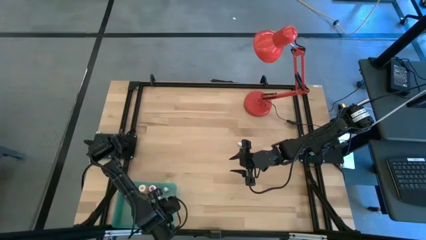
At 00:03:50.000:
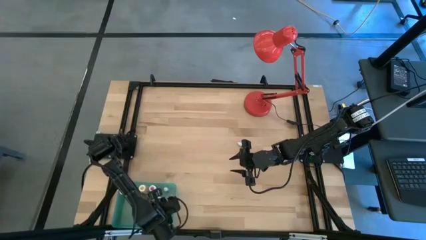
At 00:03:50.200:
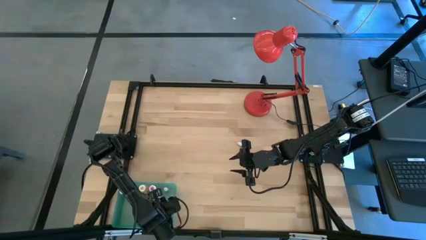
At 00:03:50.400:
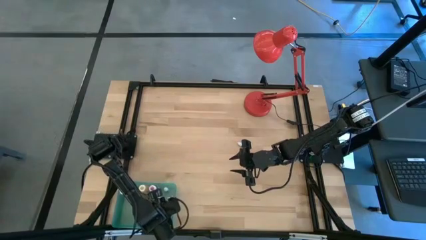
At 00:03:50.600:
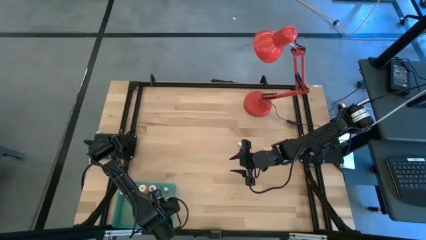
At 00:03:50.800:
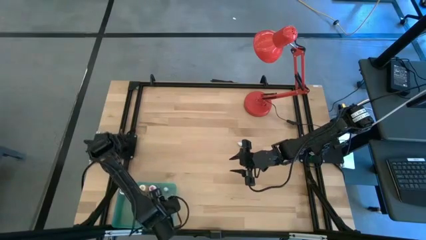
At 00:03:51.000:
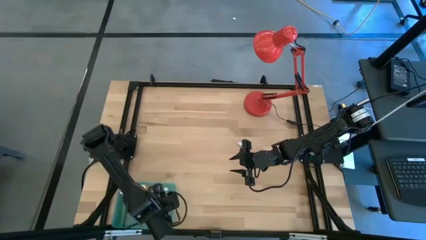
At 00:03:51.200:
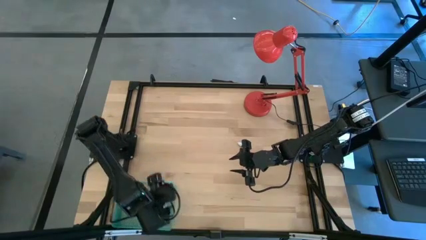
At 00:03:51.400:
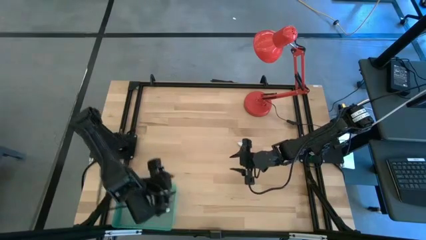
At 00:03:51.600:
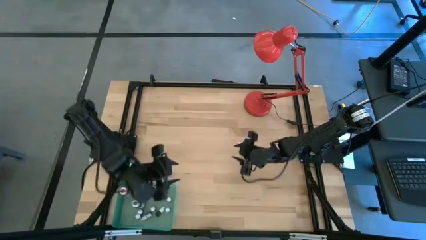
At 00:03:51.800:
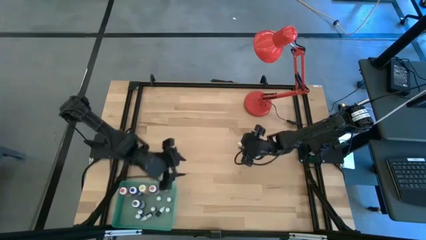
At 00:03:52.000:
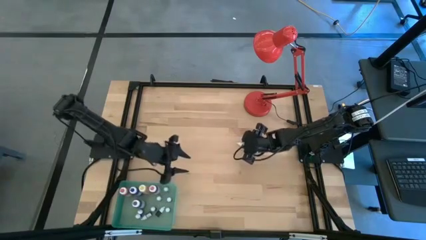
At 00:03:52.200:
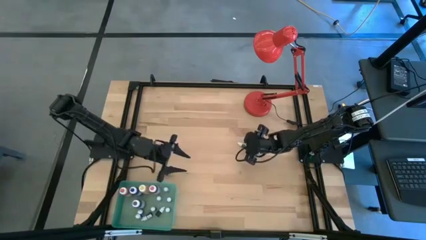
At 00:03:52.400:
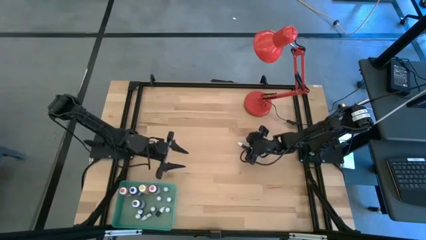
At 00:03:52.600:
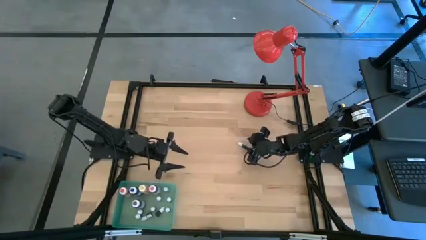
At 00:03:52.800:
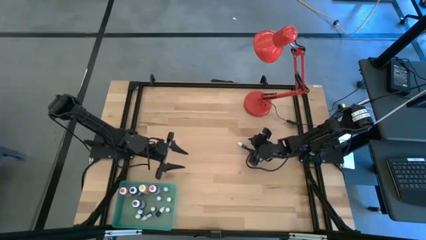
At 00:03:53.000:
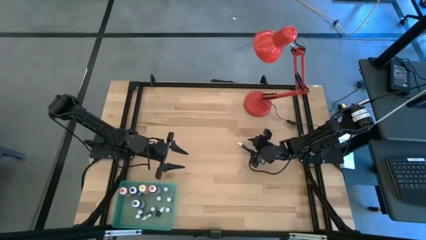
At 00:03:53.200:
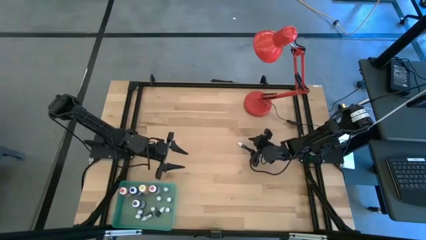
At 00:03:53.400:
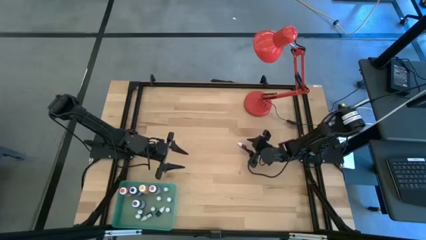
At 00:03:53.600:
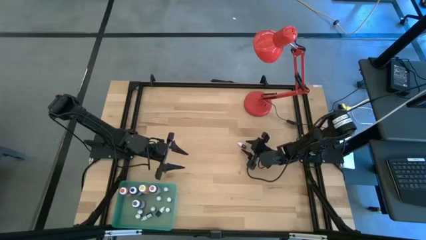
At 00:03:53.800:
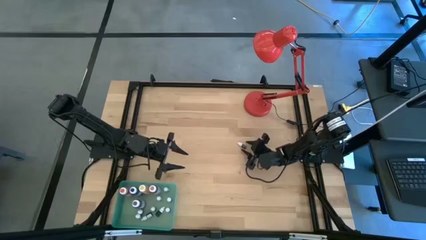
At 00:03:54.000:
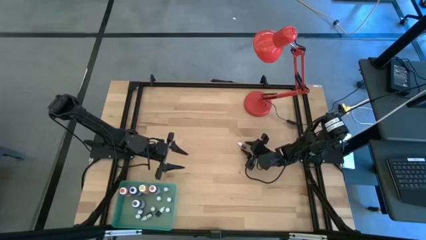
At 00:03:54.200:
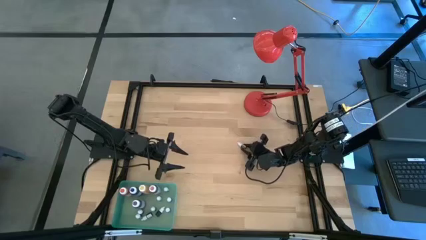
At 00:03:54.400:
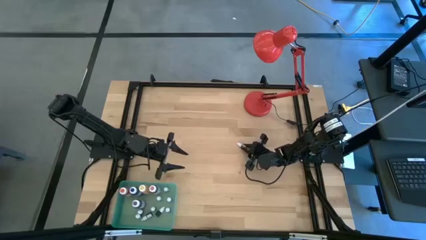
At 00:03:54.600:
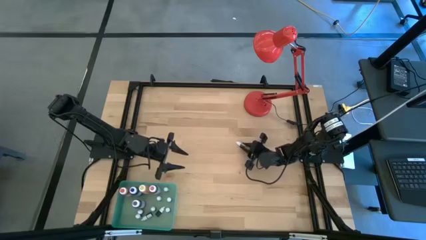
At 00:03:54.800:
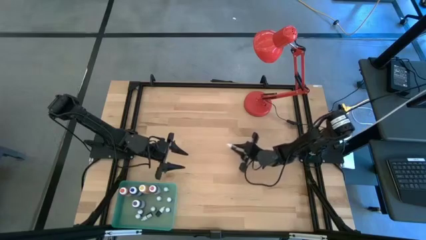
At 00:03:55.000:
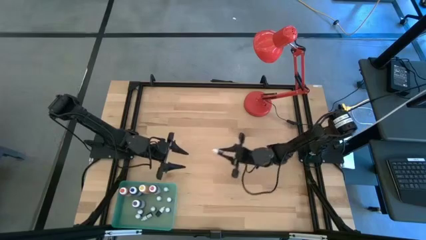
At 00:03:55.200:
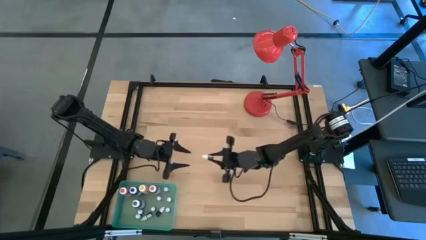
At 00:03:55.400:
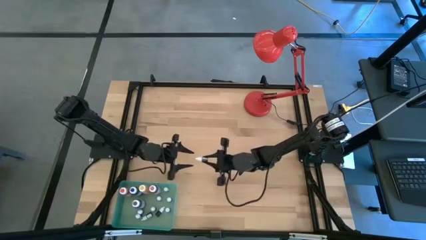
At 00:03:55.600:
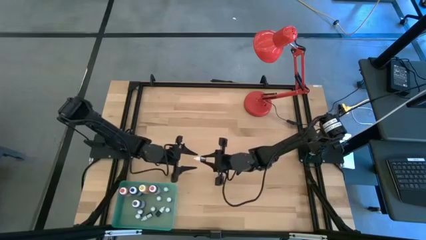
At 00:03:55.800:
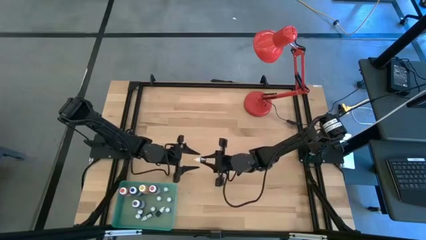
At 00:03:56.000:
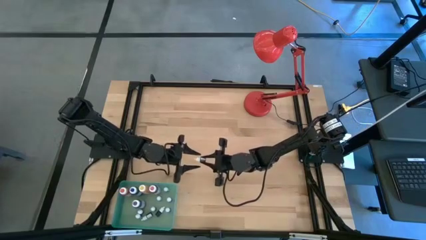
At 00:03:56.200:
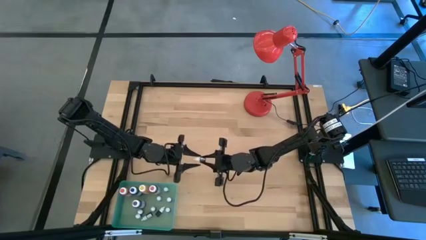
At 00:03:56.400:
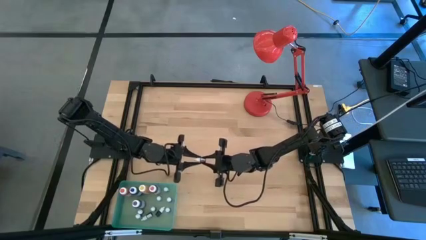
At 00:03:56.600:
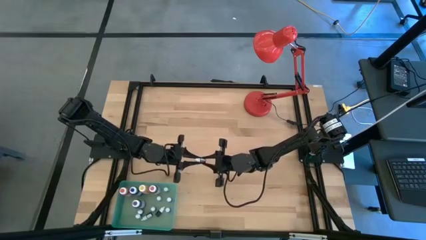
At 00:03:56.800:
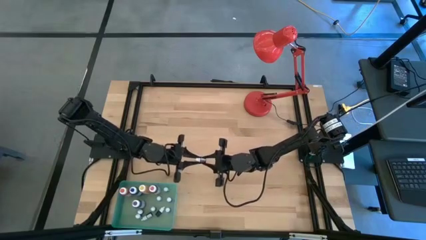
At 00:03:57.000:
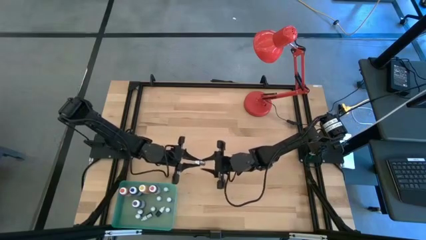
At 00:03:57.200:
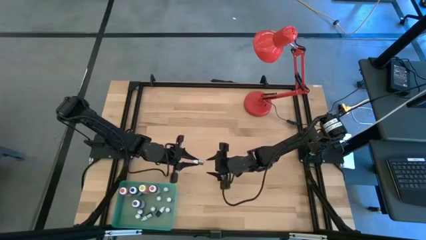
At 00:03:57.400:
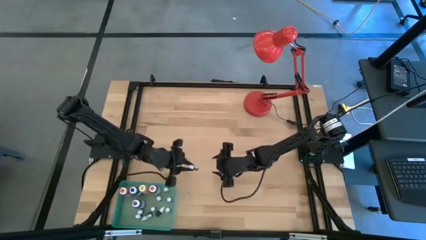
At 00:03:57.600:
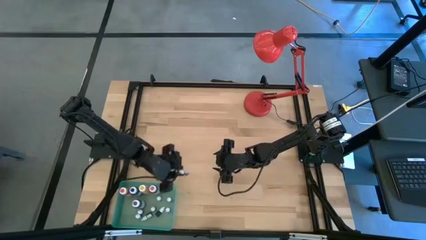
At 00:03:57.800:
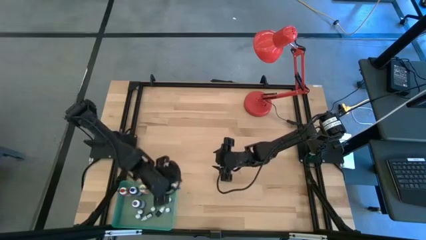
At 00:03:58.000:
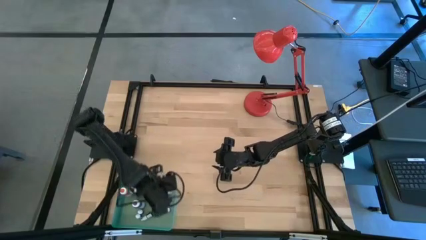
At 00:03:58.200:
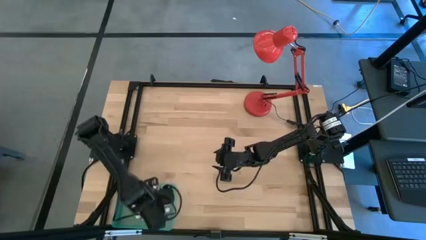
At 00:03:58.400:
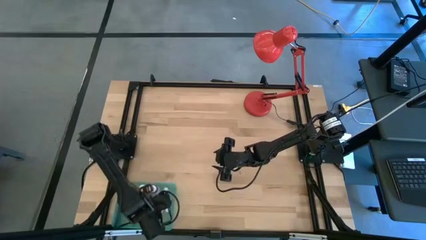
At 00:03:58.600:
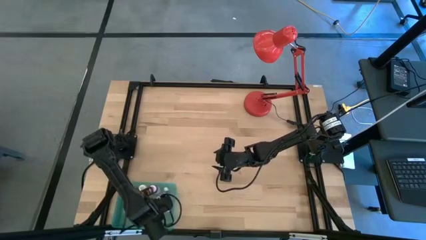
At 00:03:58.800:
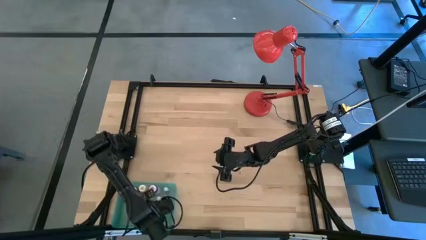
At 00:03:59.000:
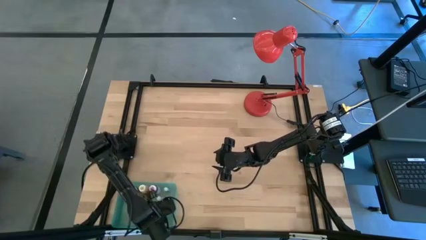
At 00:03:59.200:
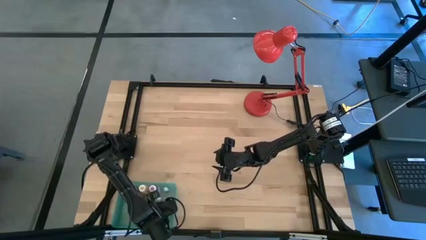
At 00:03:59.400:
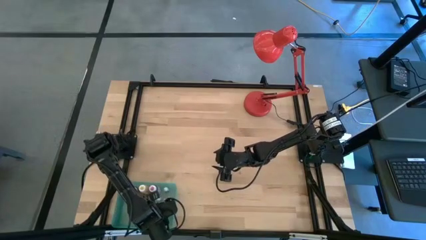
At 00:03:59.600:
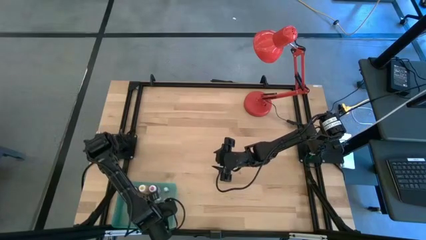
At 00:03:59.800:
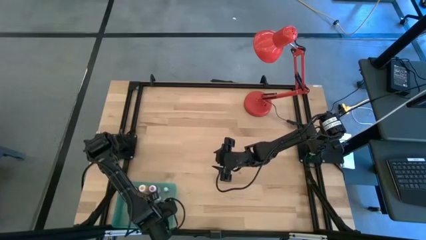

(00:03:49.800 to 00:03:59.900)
Task: Pick & Place food coloring
Put the brown food coloring into the blue bin

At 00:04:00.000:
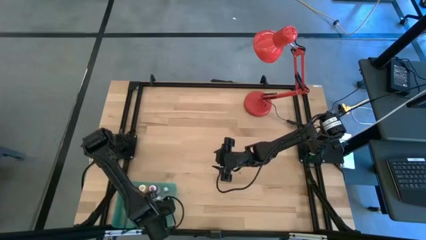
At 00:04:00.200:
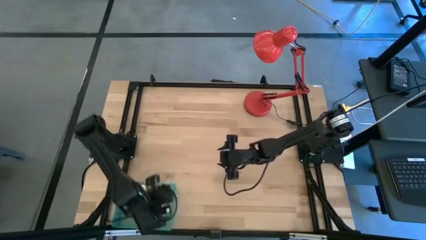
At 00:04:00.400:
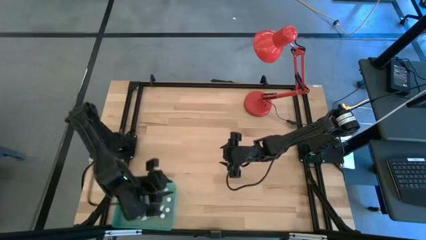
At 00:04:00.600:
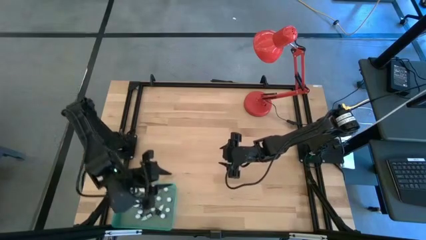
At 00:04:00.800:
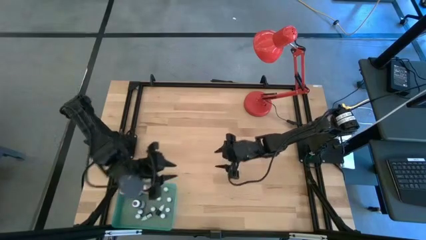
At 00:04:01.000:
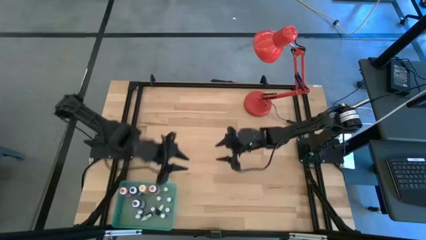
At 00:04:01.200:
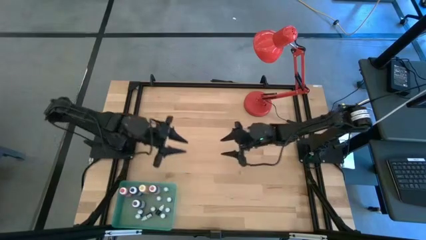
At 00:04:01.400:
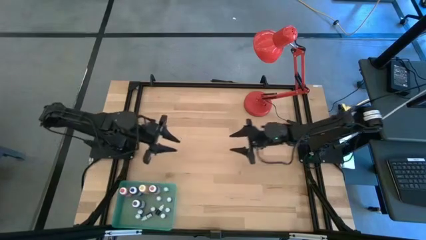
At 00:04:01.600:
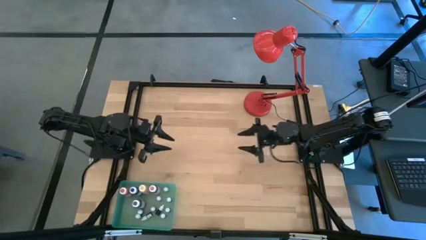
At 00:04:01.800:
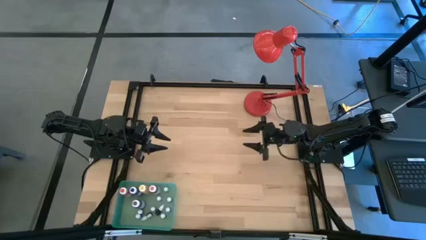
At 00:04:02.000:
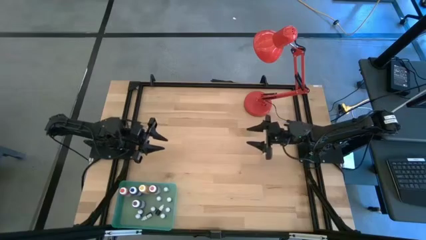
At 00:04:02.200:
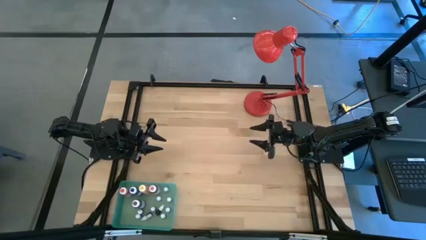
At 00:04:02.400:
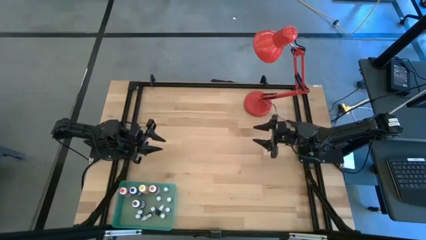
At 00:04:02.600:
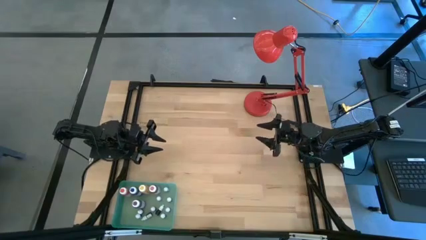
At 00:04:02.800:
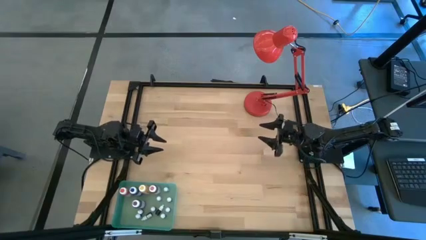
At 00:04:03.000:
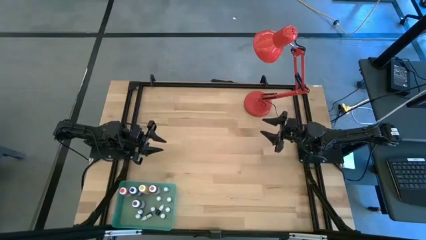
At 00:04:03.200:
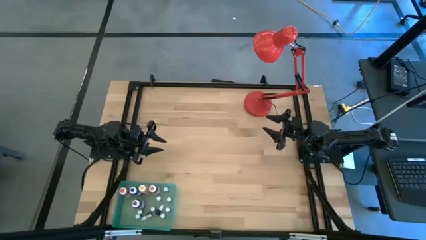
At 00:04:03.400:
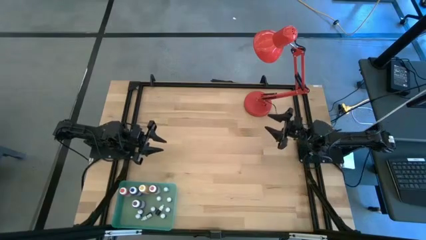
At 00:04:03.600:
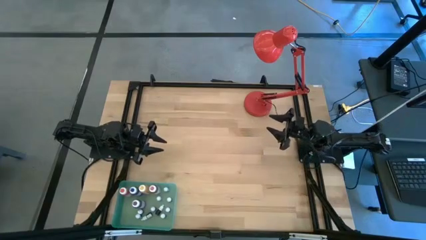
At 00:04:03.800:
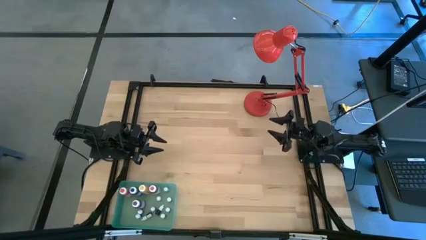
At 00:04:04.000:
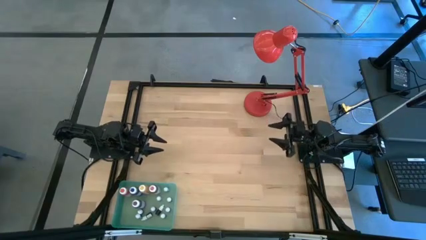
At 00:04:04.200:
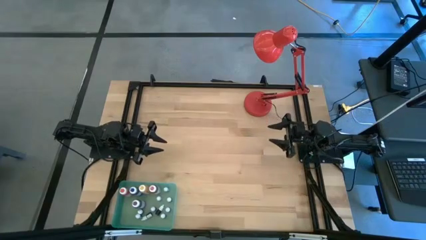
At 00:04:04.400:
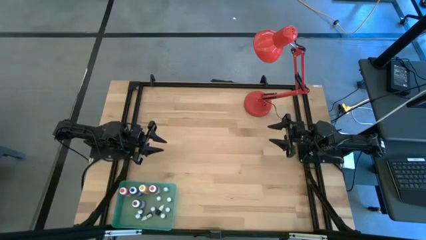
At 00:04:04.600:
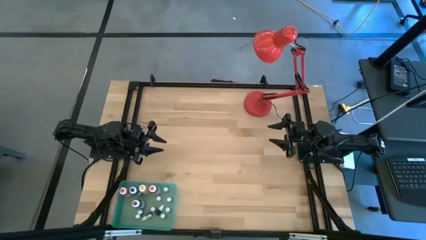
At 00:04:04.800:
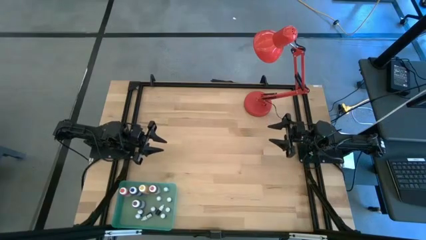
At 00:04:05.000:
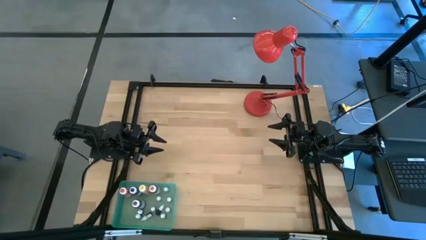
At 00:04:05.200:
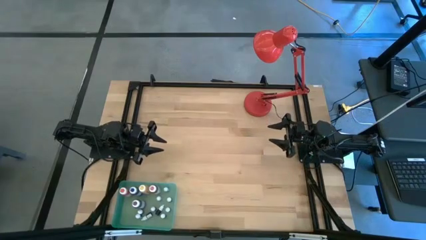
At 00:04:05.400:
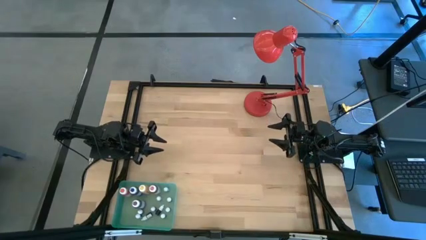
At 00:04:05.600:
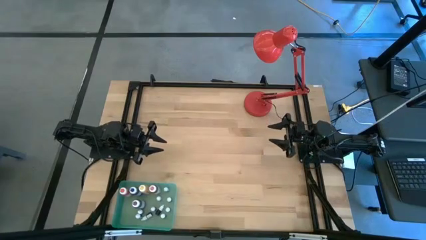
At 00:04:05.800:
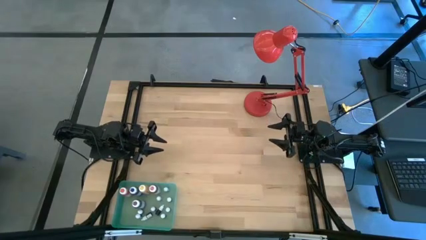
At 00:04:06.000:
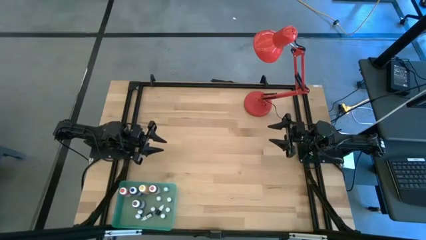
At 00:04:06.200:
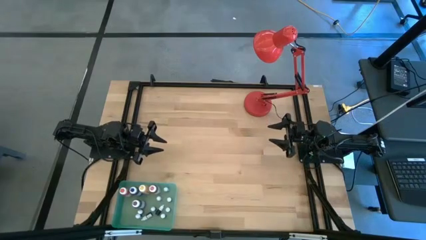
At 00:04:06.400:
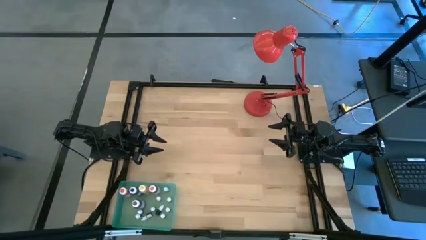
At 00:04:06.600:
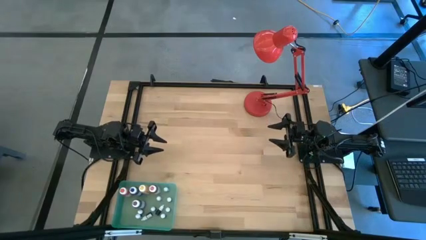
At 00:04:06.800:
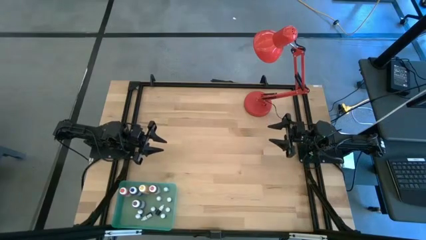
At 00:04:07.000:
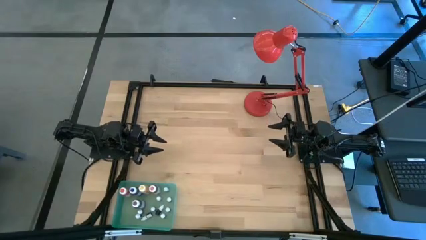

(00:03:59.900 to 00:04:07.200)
Return to Home Position
